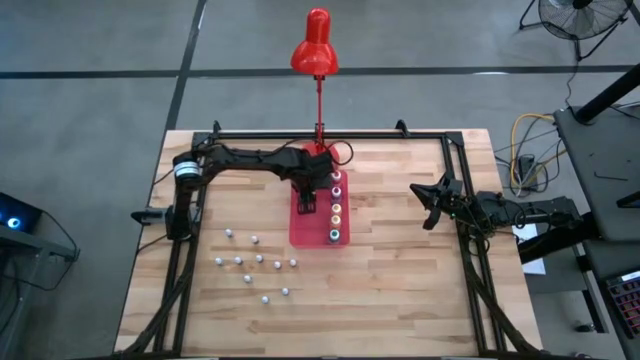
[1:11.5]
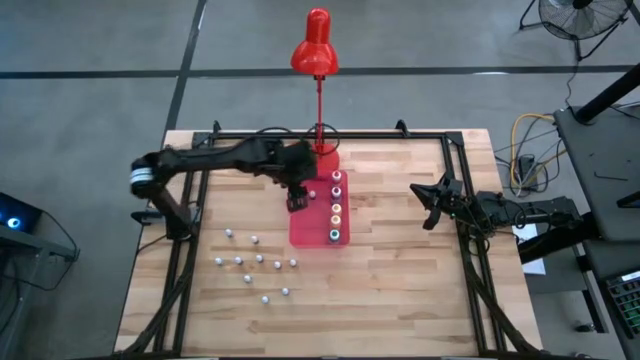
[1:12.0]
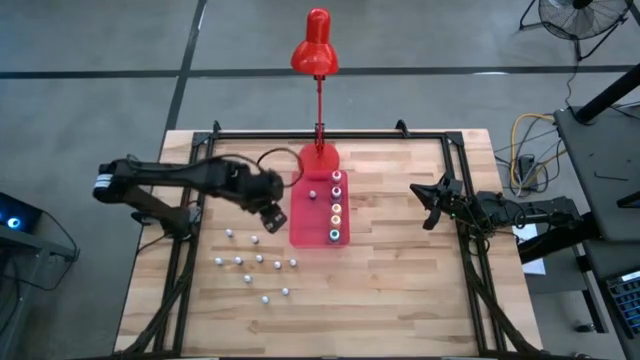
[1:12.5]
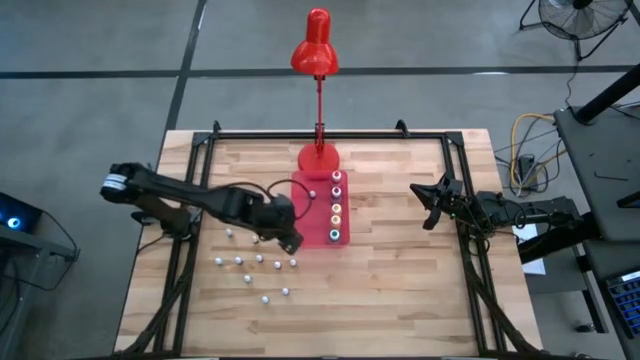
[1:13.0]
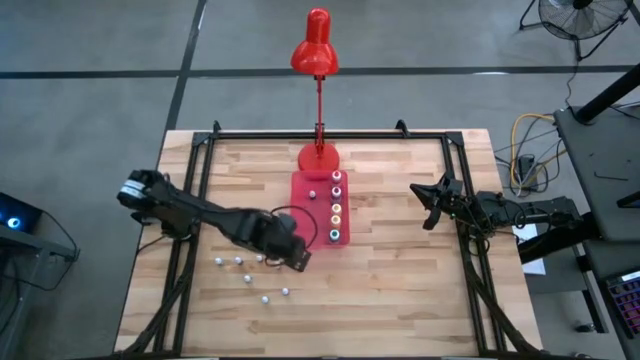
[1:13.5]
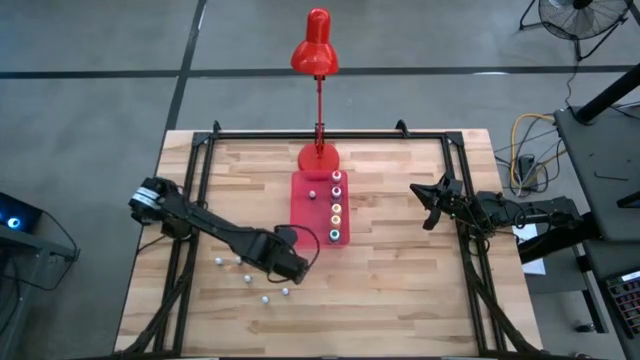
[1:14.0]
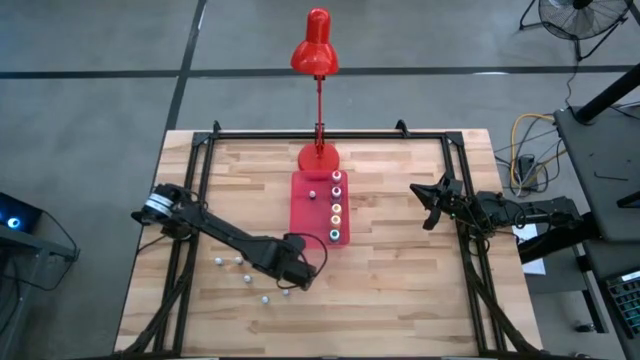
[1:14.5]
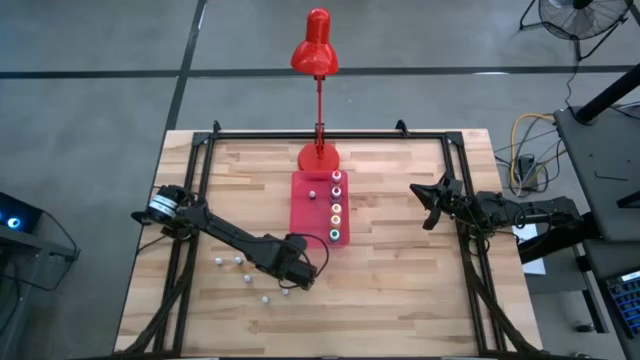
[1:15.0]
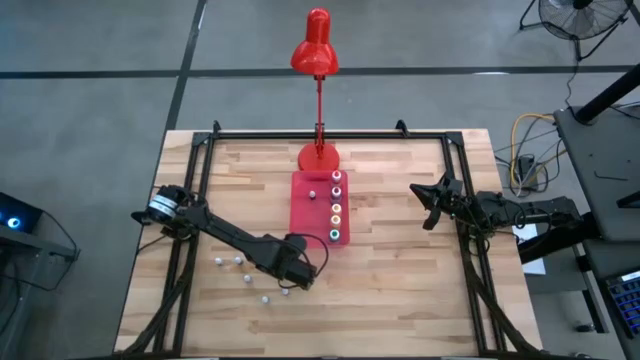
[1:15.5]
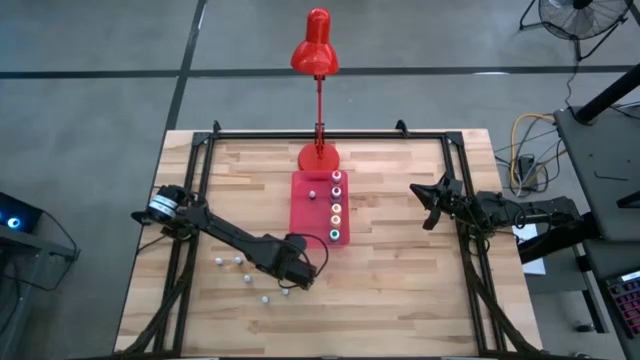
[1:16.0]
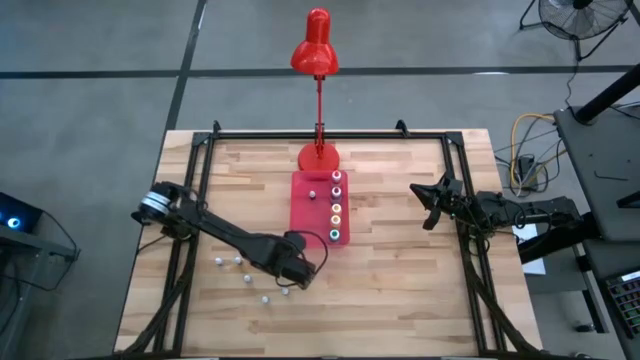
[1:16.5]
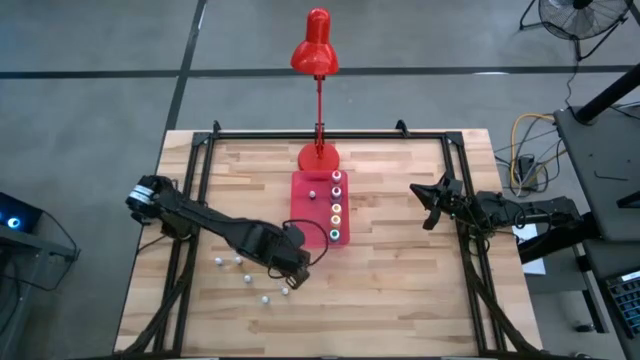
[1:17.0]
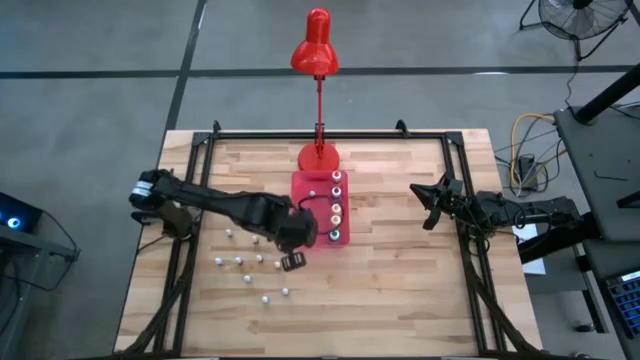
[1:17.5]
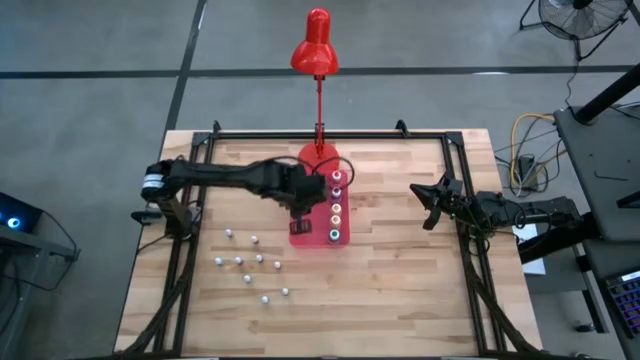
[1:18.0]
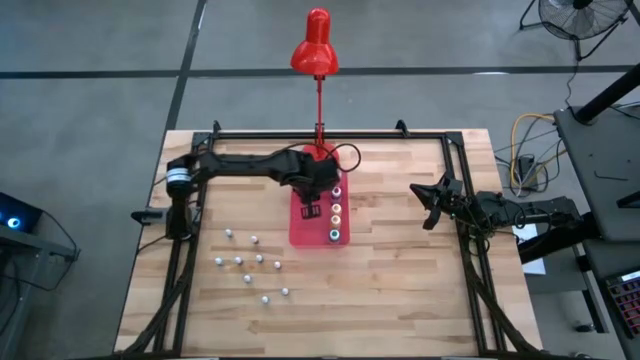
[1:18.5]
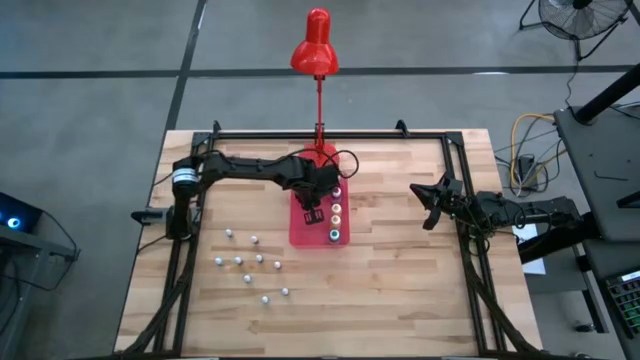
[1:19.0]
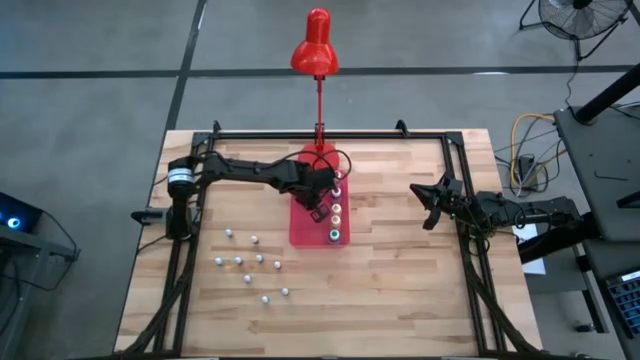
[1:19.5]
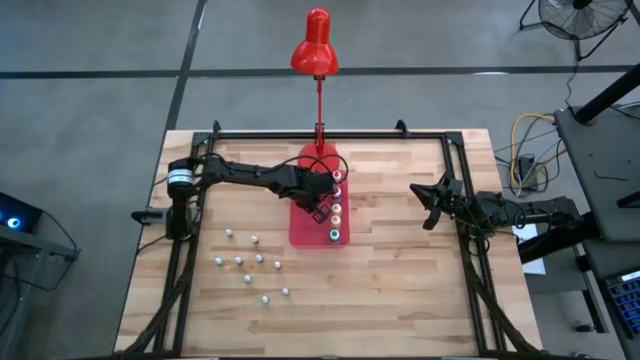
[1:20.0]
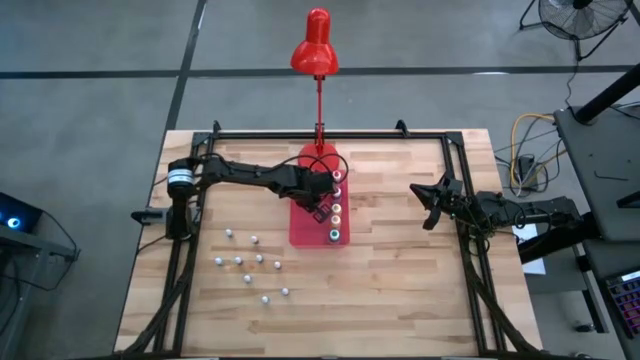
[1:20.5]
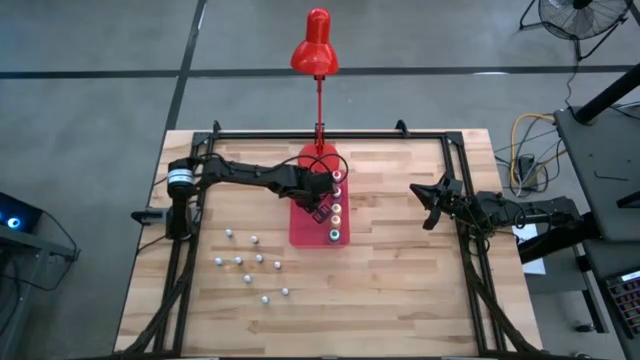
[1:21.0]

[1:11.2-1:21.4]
Task: Pick & Place food coloring
Put the small pink food coloring bottle into the pink bin

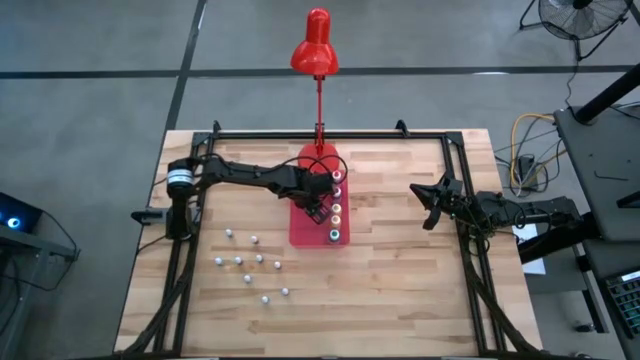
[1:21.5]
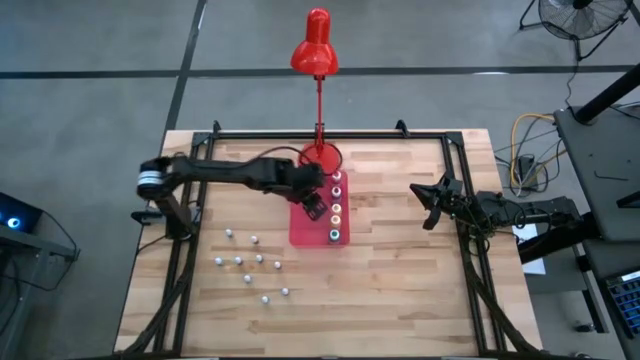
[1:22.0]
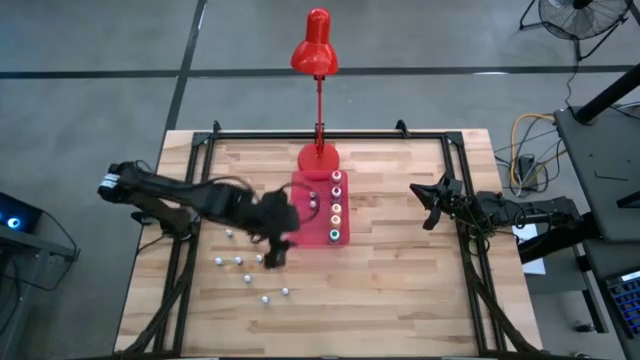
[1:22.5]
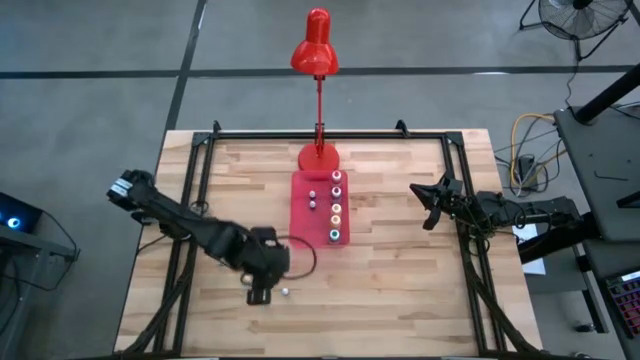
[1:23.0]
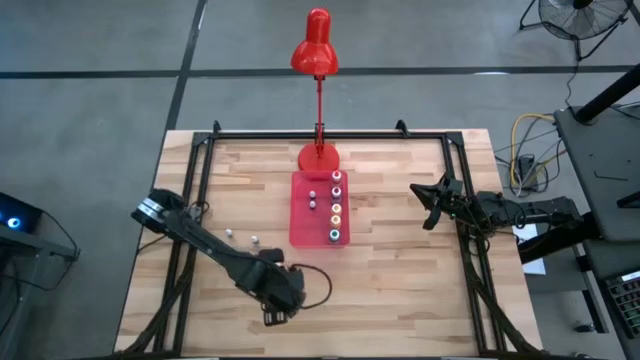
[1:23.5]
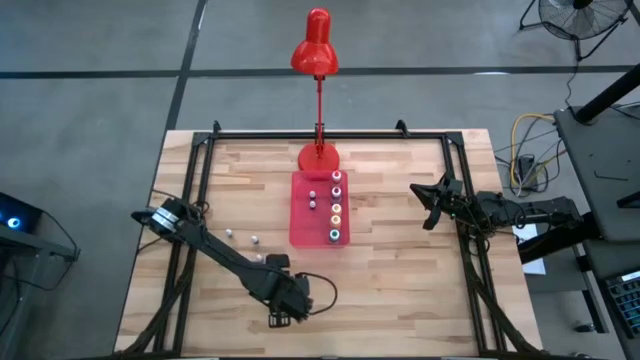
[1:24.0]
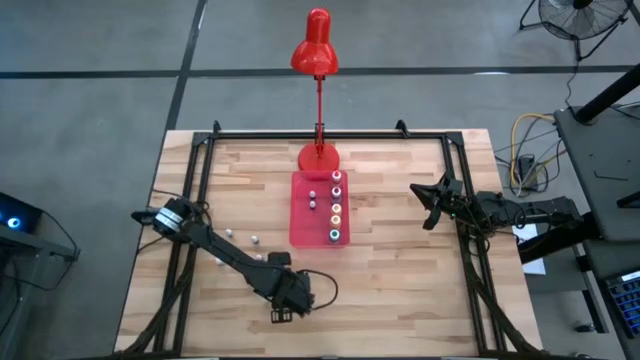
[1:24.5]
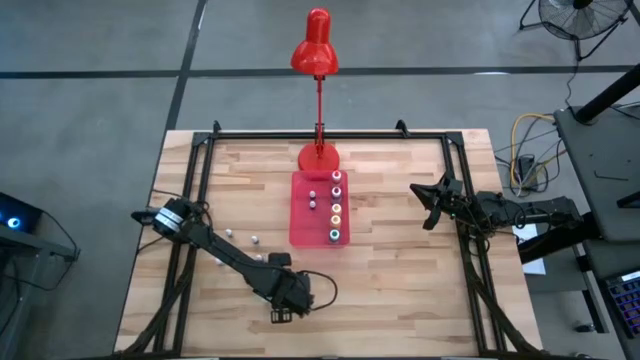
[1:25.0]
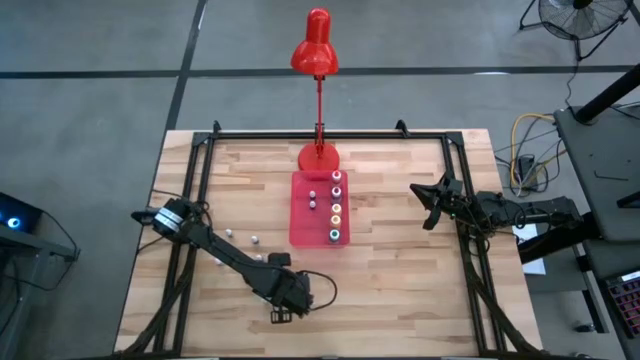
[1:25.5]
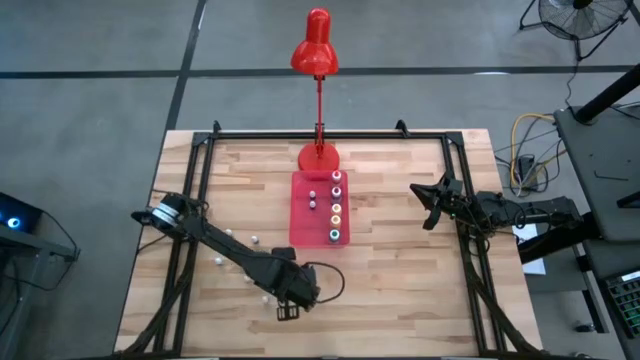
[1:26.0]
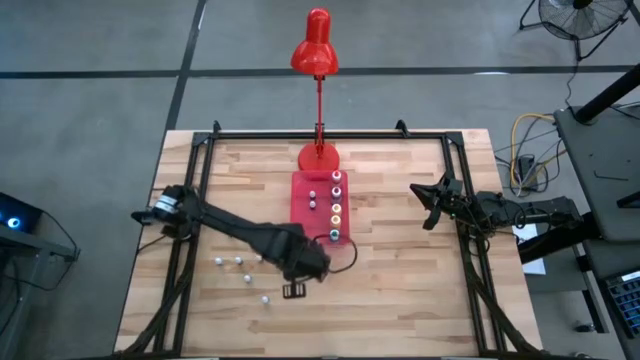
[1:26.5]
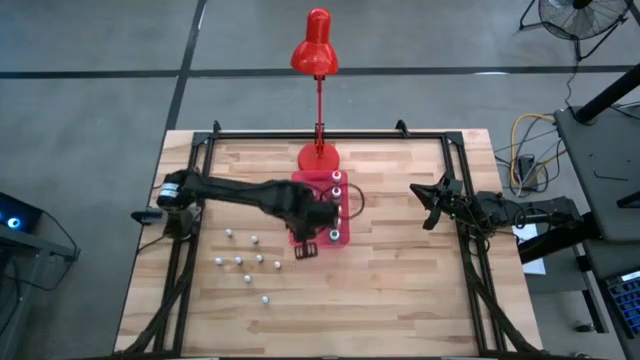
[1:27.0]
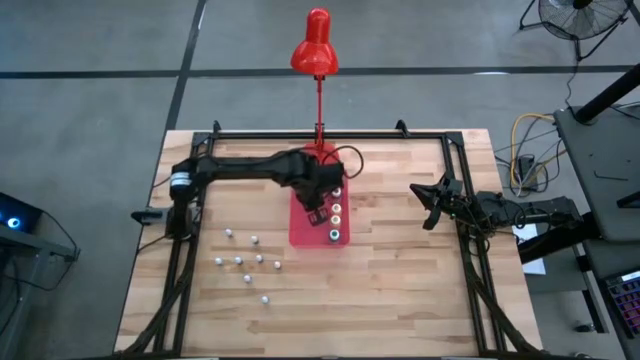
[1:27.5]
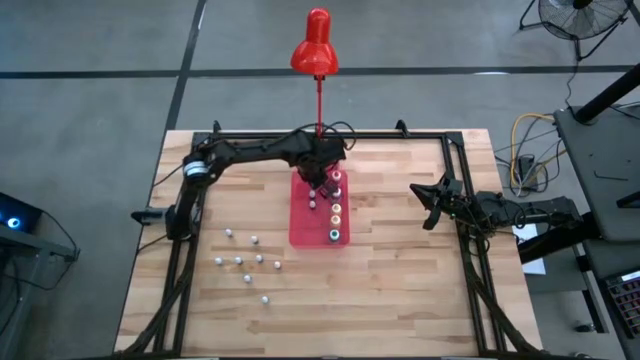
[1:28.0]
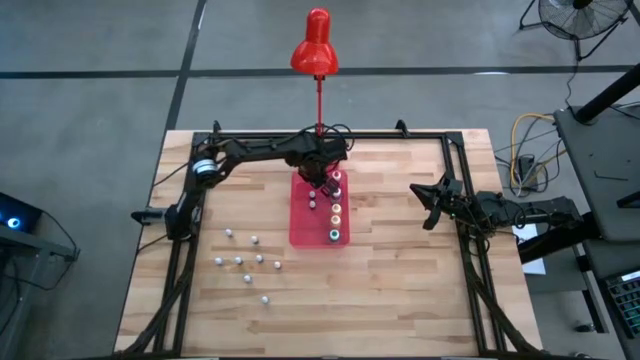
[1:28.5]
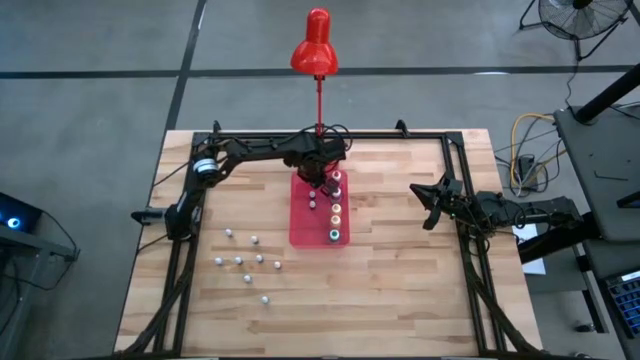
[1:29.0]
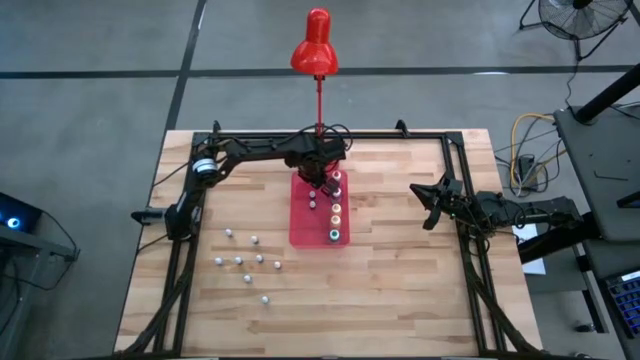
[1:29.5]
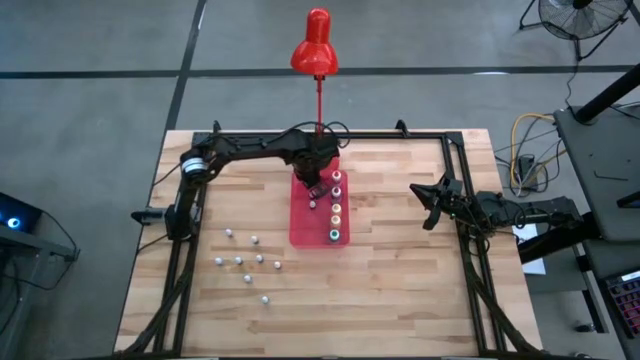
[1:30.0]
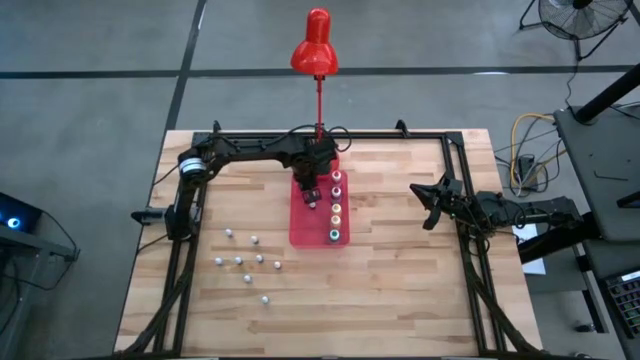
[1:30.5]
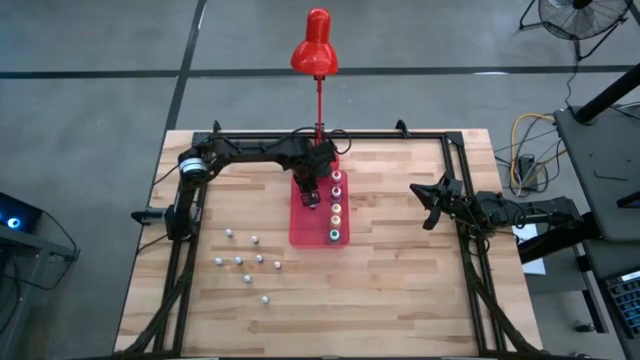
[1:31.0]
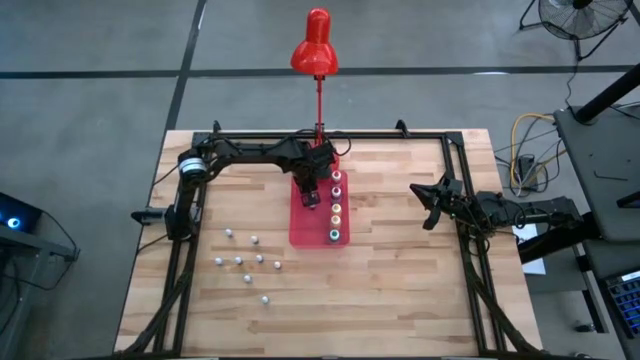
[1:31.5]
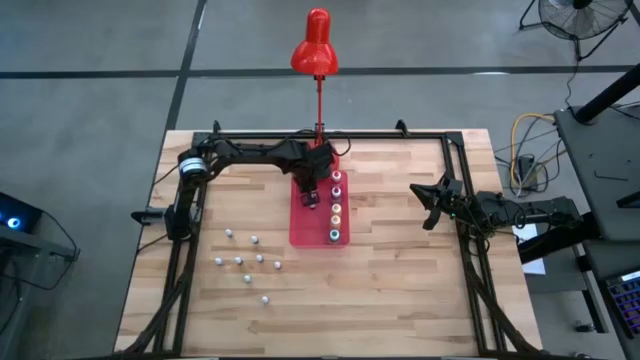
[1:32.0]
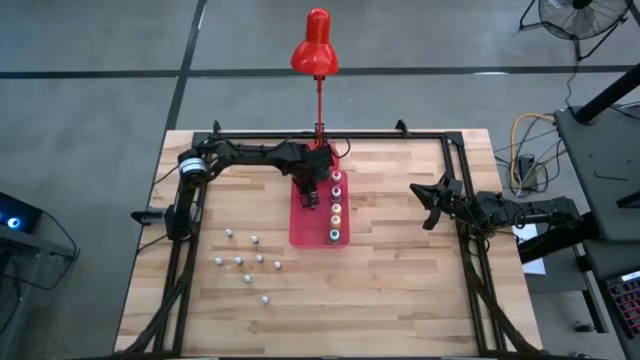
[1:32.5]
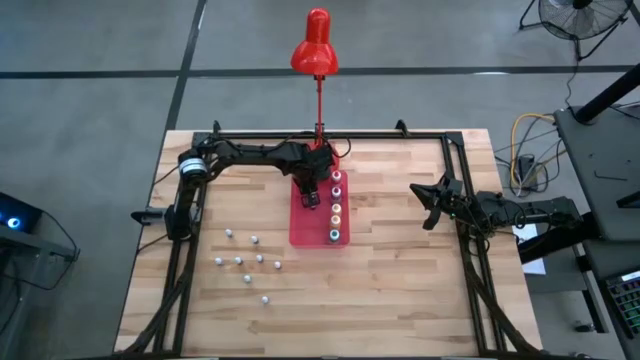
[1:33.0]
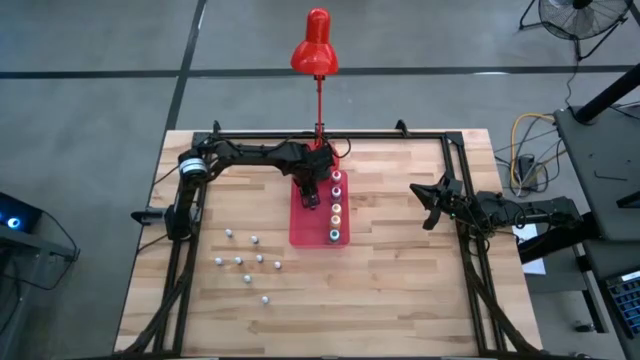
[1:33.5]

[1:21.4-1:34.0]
Put the small red food coloring bottle into the pink bin
